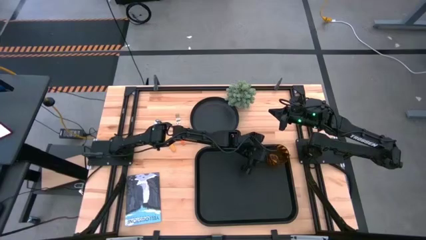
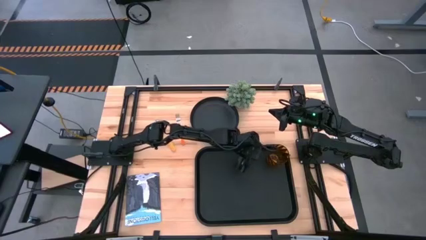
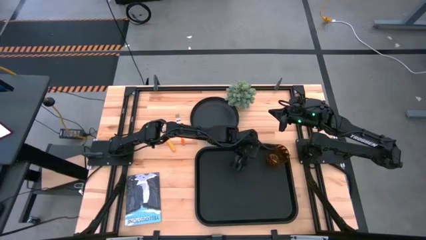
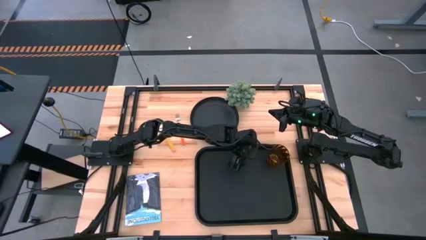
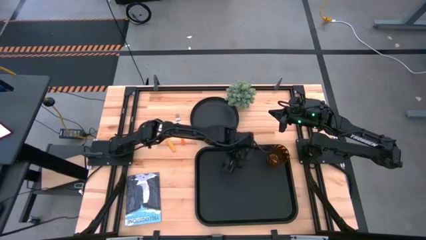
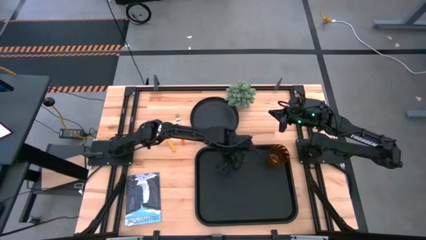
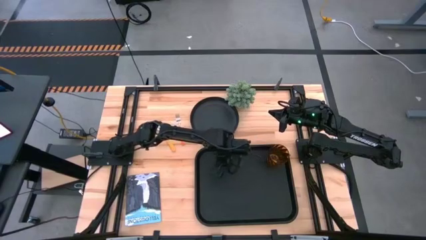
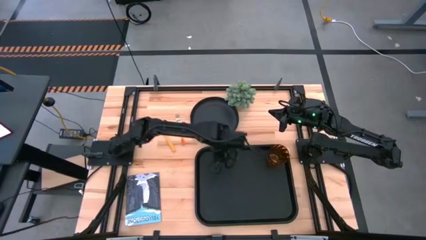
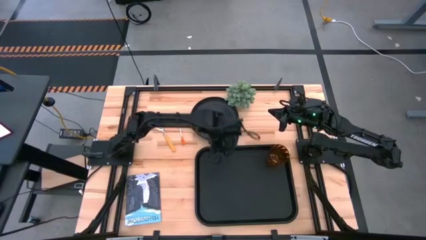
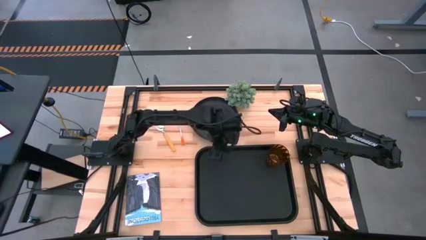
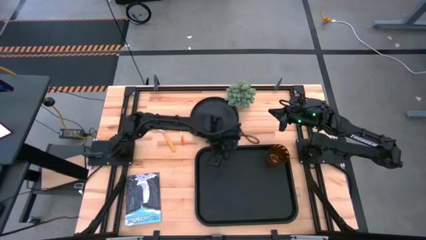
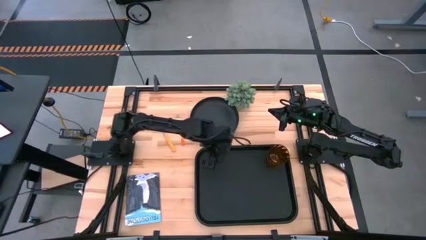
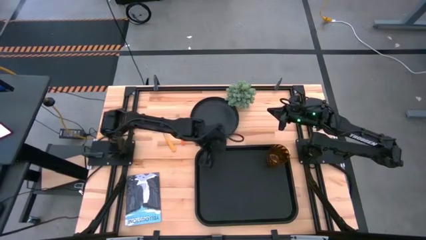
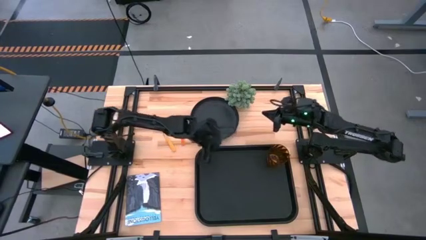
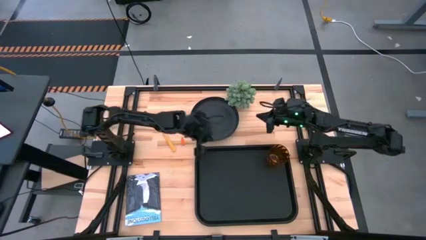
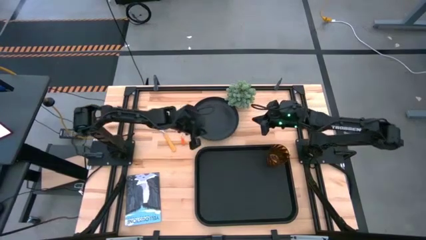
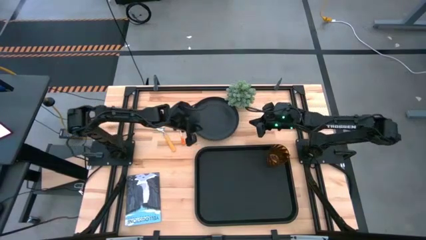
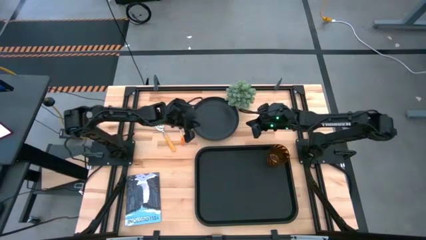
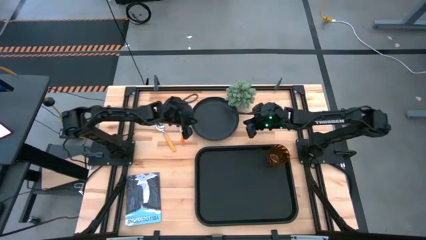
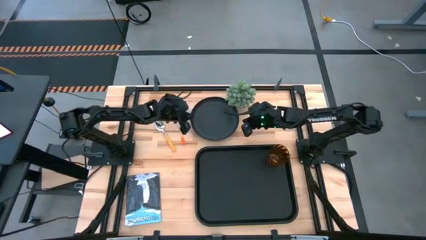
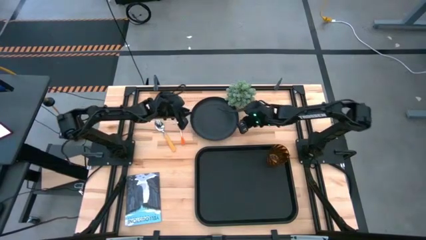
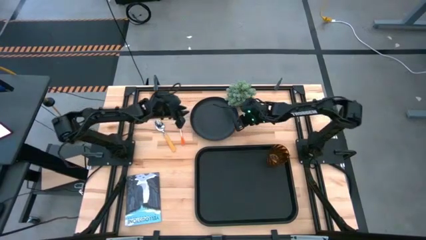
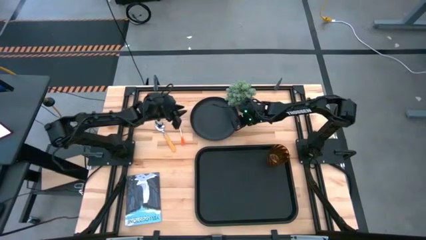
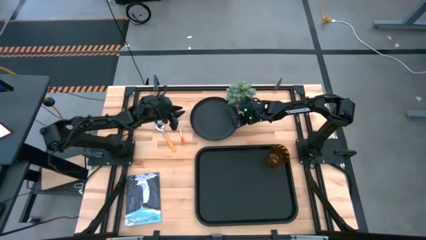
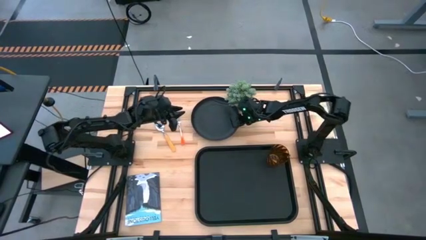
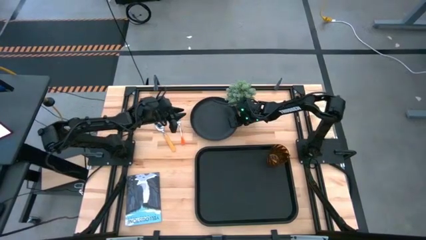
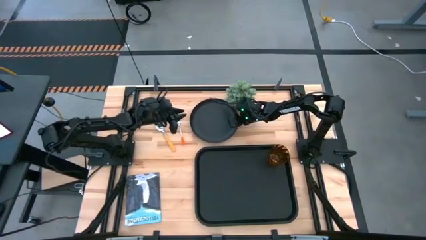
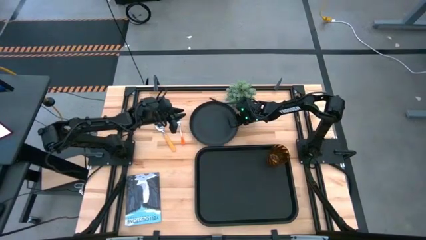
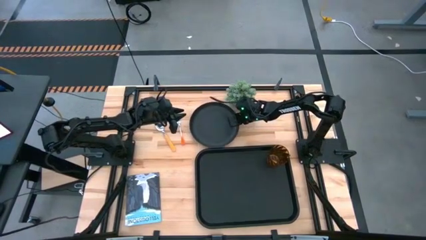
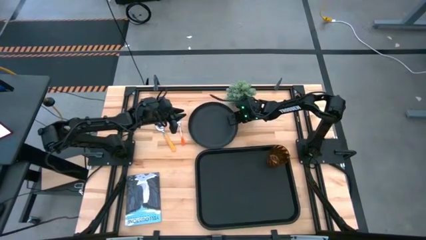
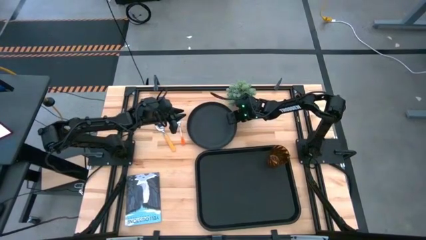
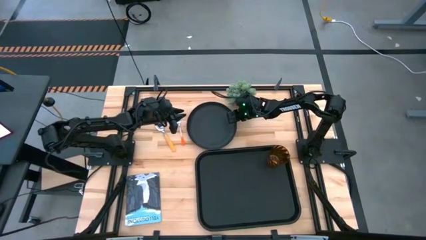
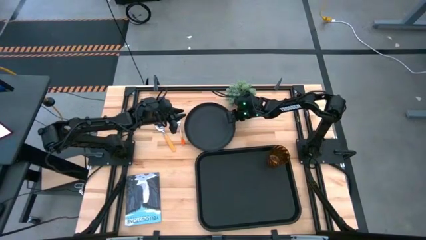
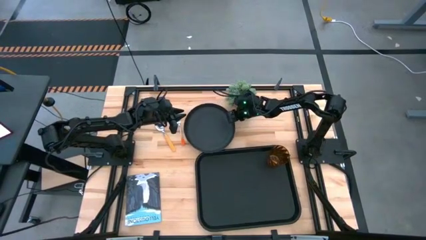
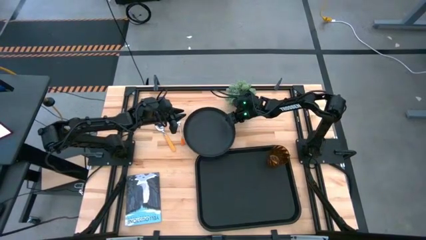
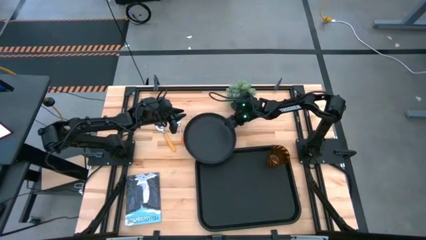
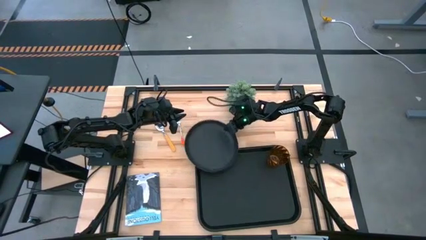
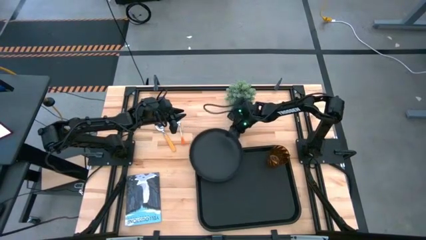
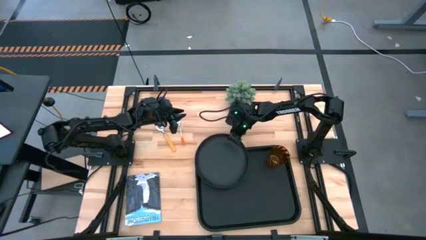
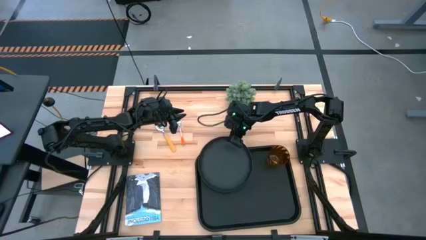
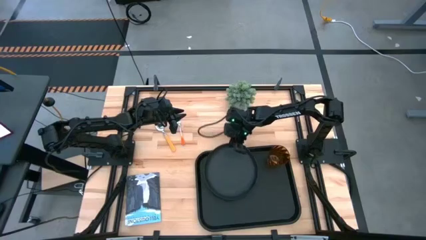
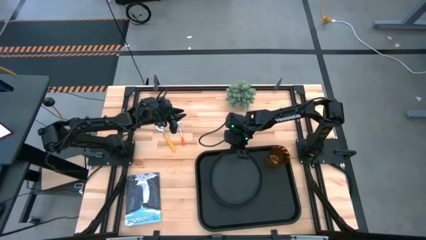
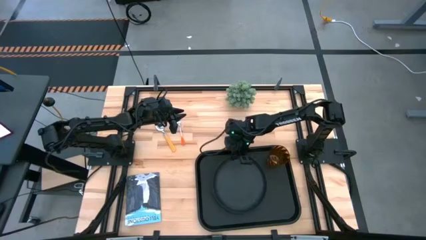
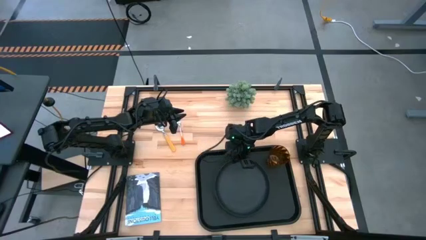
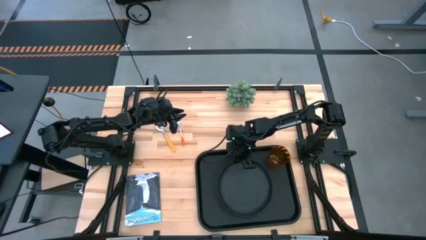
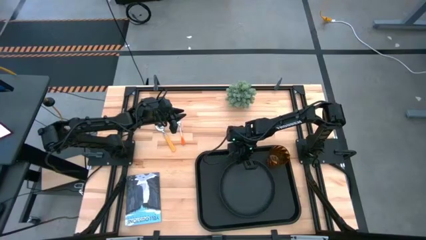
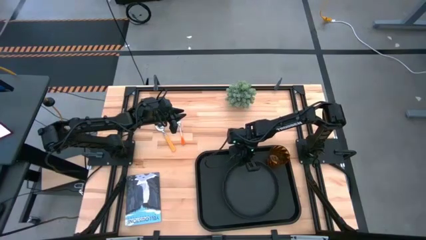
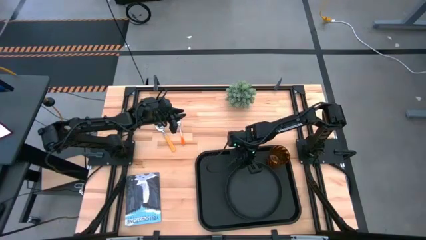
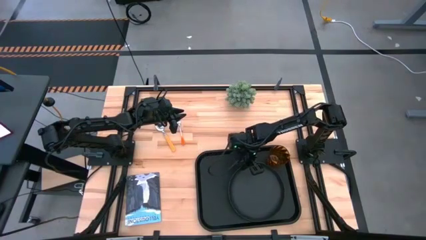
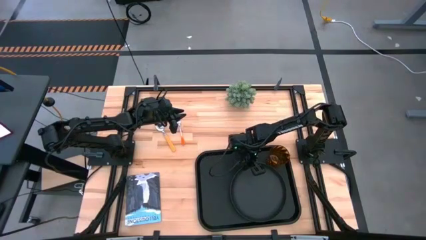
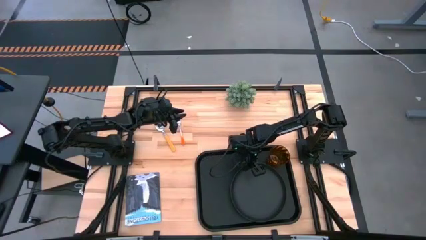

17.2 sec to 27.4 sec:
Task: Pick and place plate/cup/fork/spoon on tray
Put the black plate on the black tray

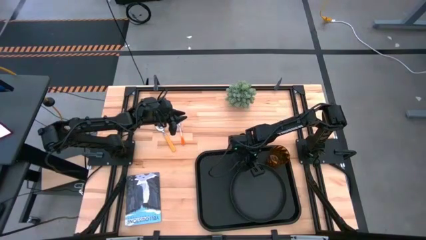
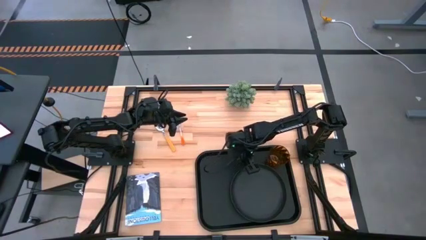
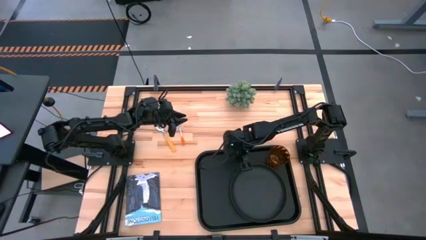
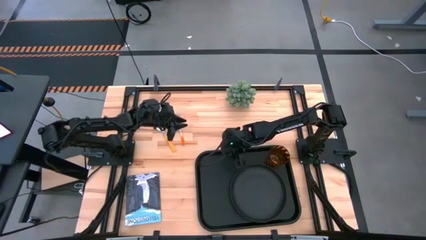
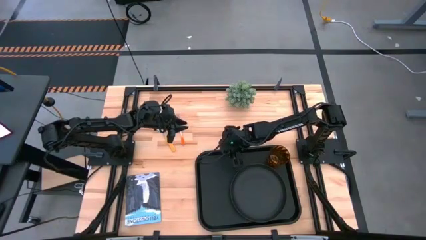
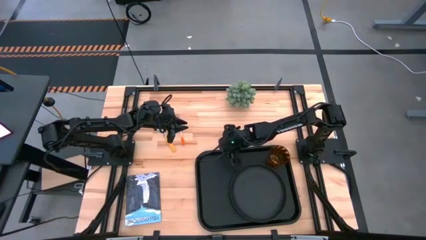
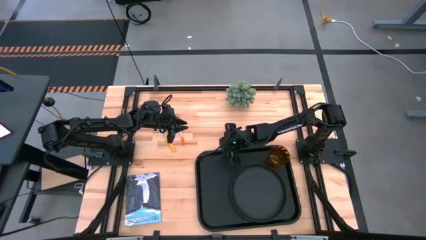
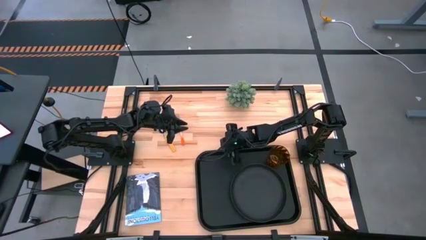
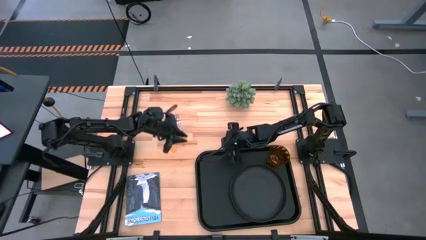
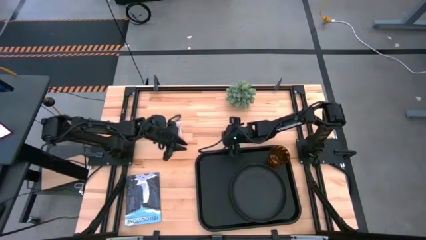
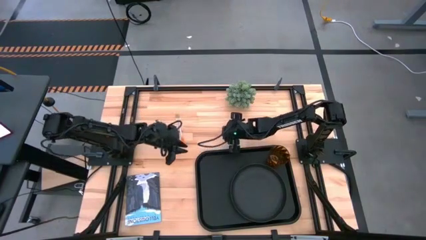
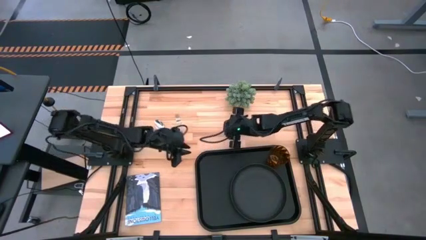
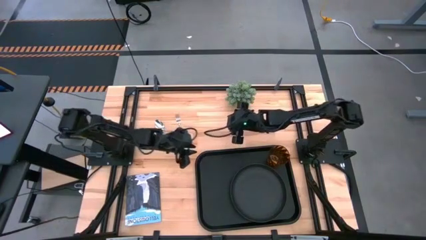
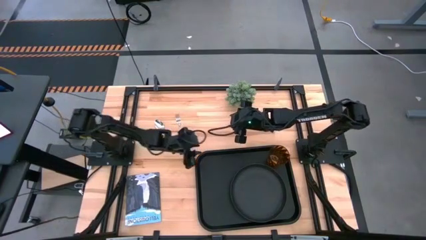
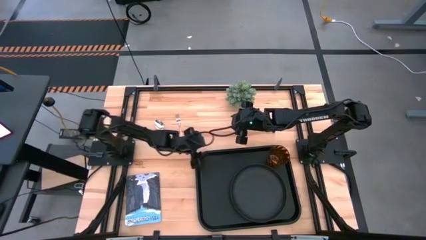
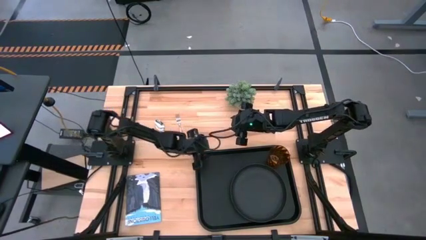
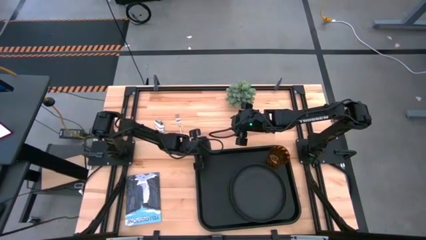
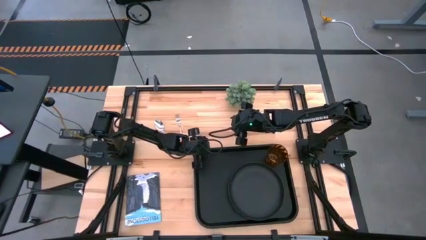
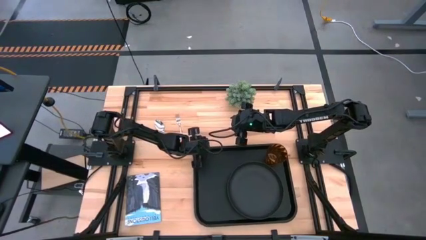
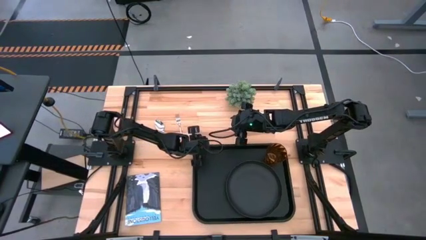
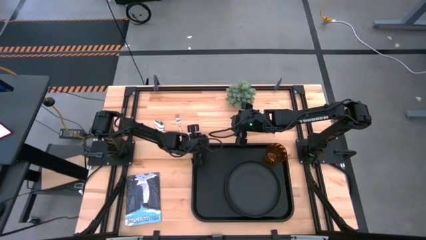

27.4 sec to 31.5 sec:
Adjust the black tray

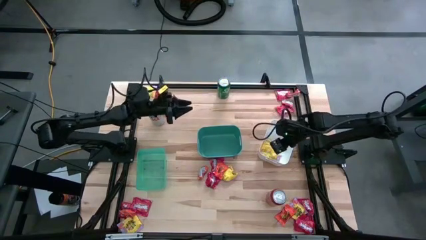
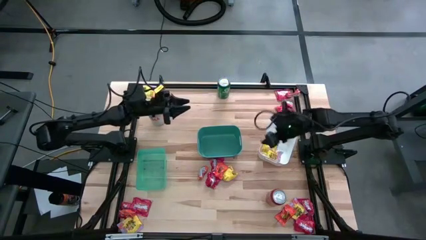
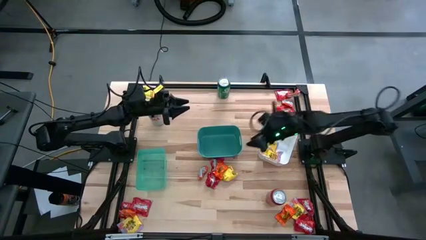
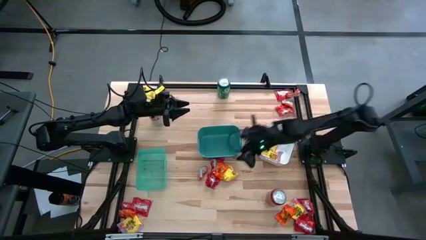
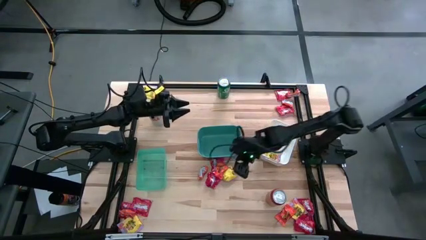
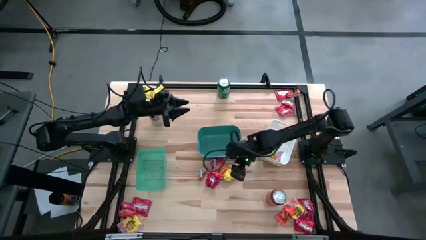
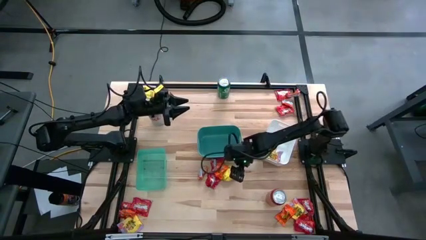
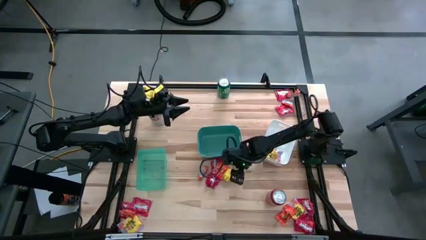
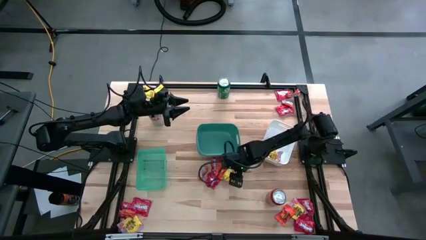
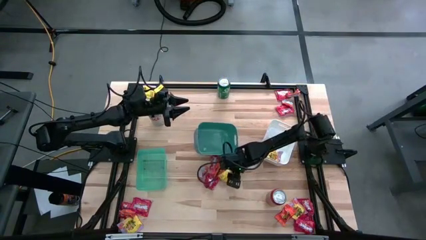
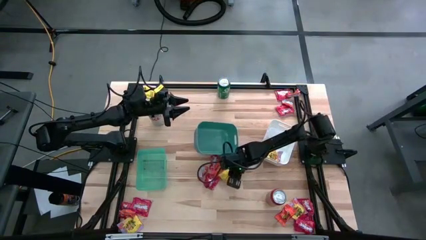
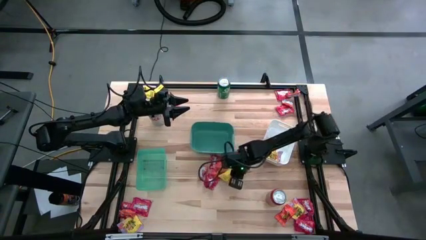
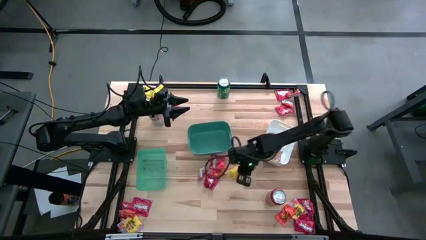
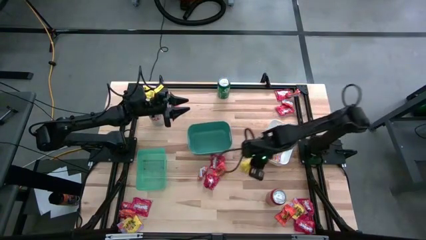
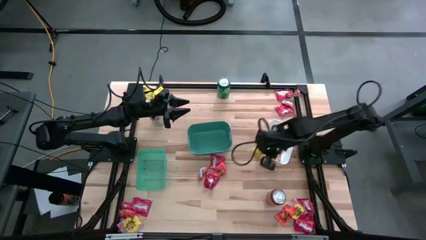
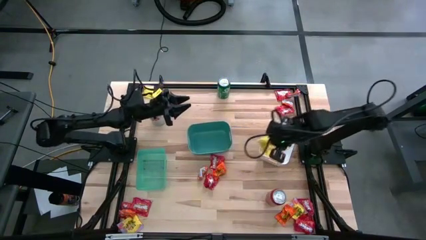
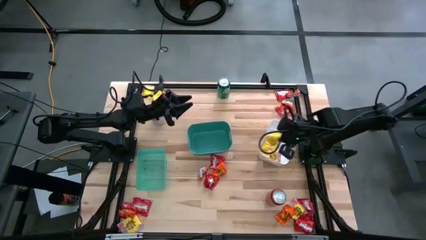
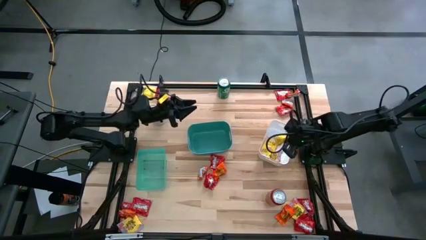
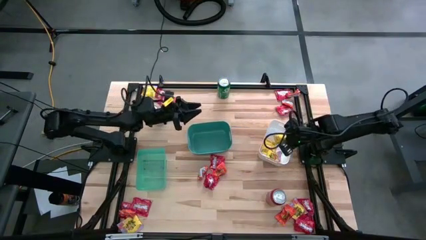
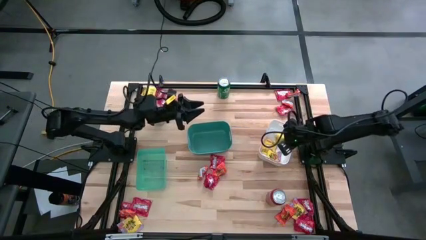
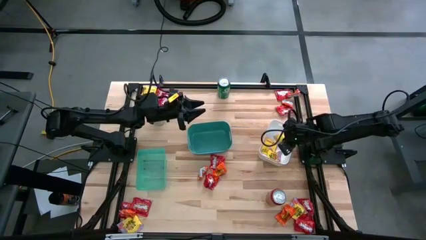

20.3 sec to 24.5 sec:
Task: Sort candy
Put the yellow candy into the white bin
